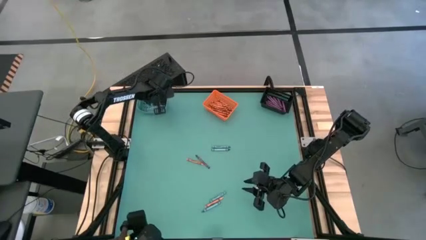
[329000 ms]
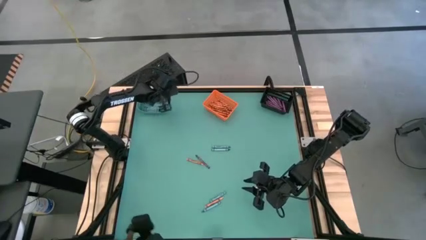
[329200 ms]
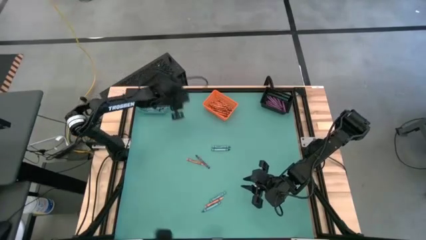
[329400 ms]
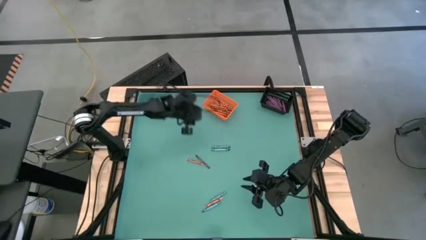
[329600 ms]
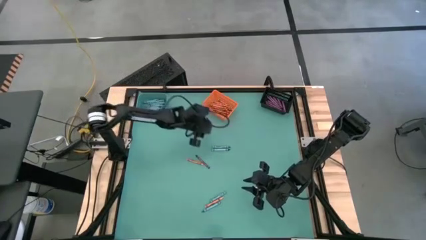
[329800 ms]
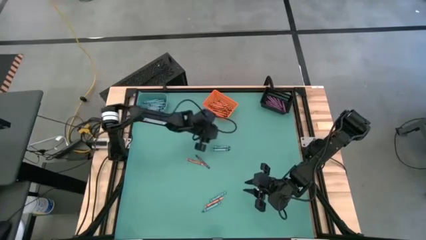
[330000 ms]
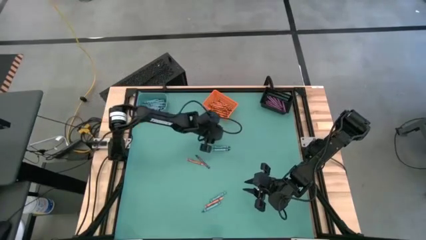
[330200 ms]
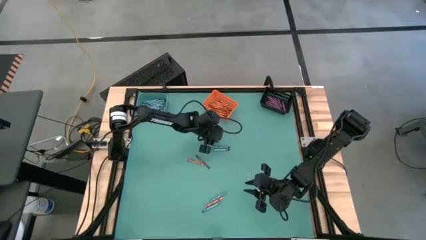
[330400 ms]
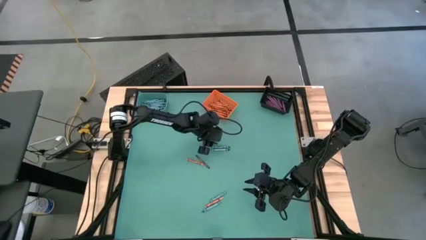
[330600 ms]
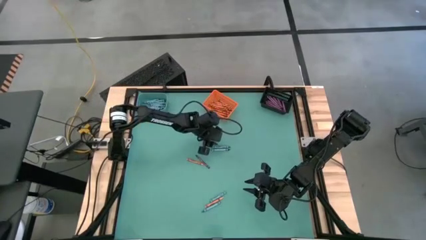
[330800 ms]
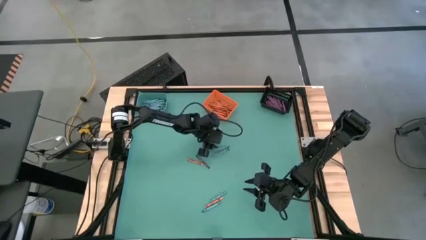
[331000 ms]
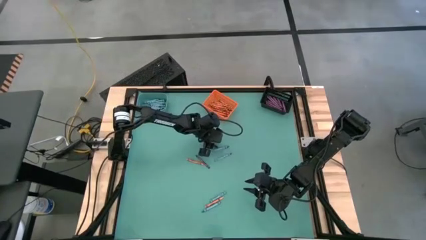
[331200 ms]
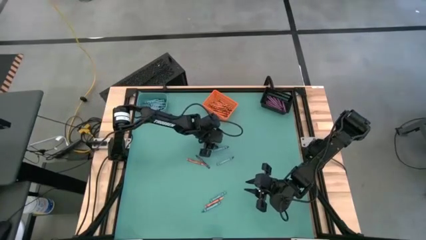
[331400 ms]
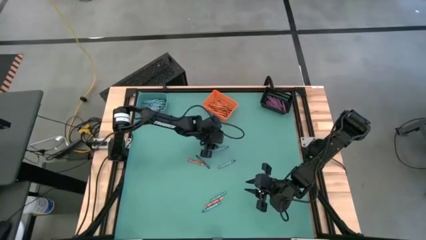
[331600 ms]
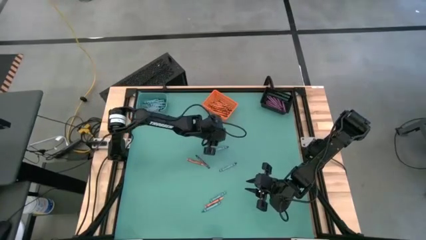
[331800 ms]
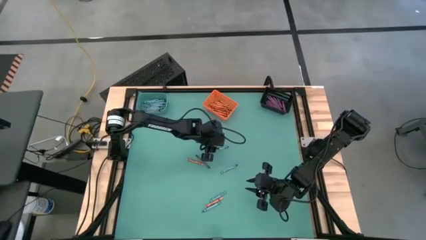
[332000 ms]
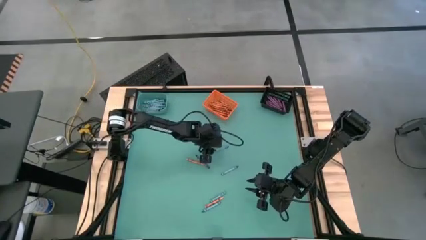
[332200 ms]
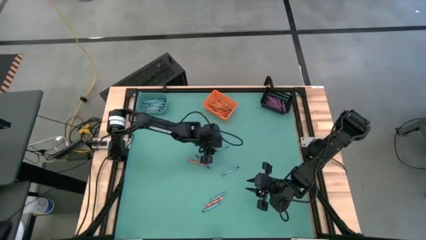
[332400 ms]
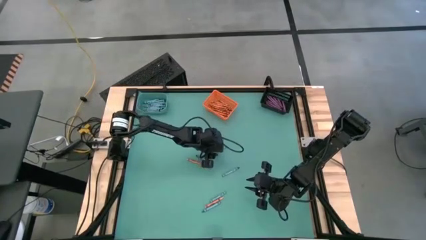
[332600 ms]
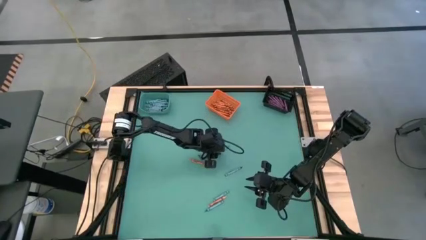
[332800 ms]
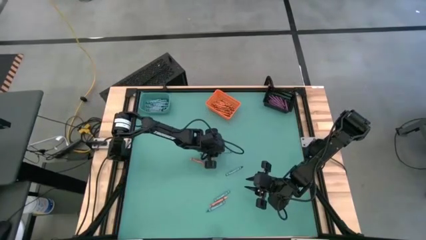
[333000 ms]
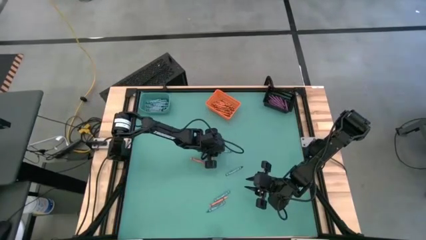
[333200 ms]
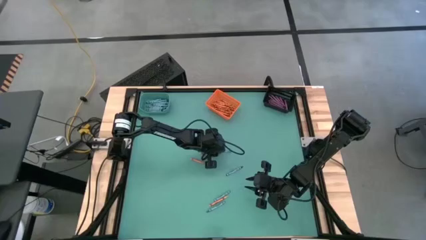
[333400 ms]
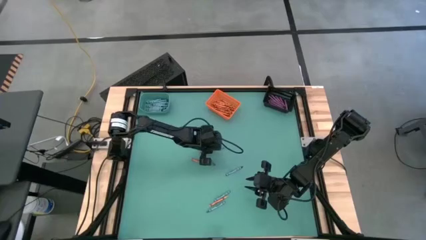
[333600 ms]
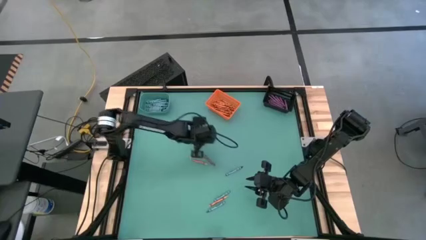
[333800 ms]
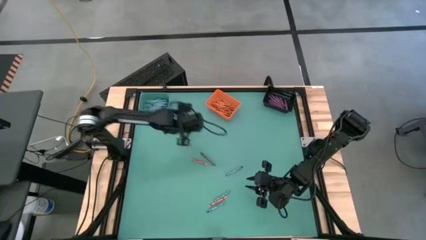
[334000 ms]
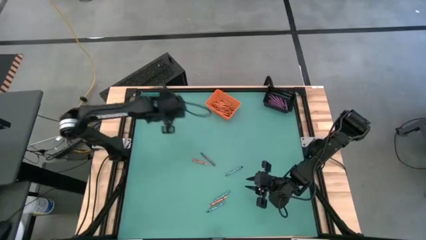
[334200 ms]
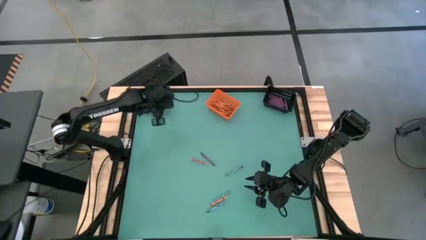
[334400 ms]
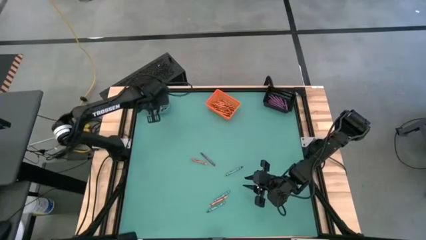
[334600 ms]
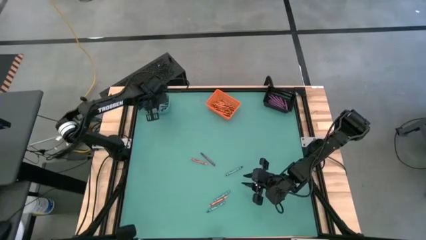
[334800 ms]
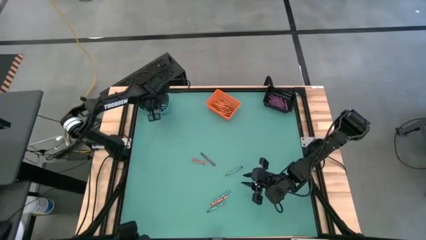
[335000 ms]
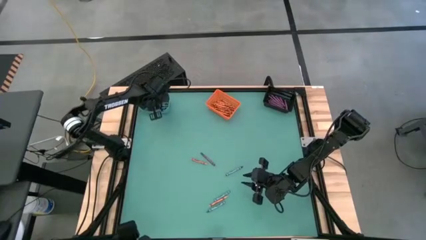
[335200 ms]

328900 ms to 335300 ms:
Task: Sort crayons
Put the blue crayon into the blue bin

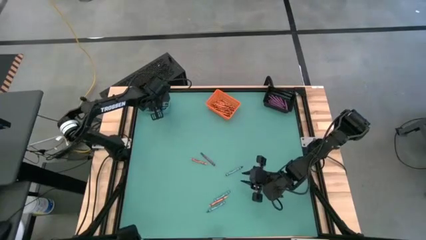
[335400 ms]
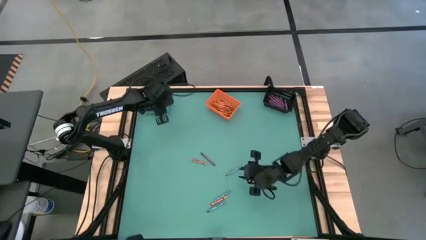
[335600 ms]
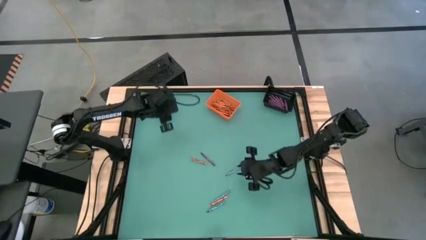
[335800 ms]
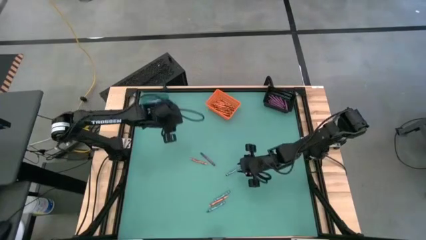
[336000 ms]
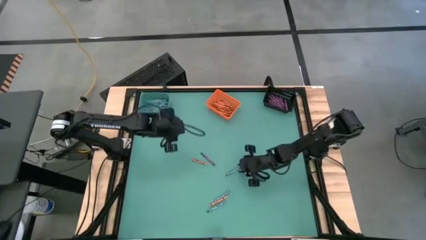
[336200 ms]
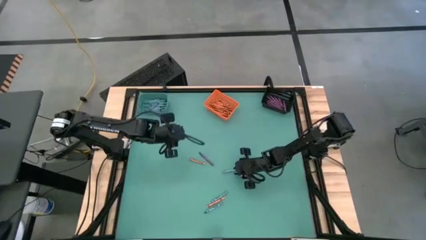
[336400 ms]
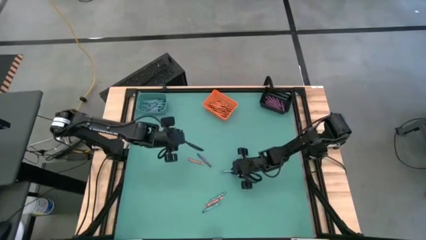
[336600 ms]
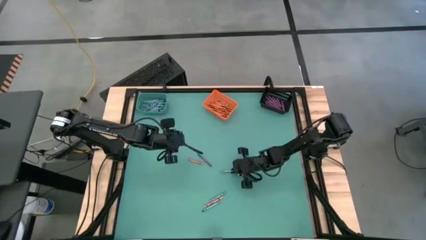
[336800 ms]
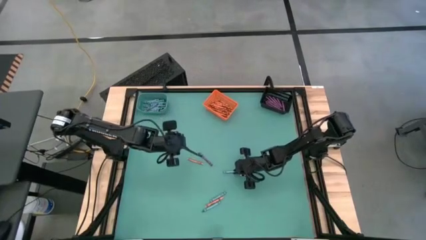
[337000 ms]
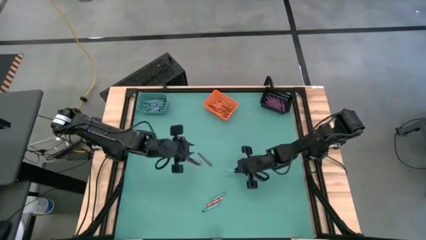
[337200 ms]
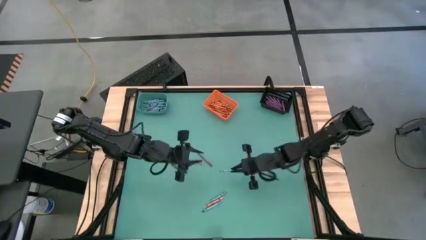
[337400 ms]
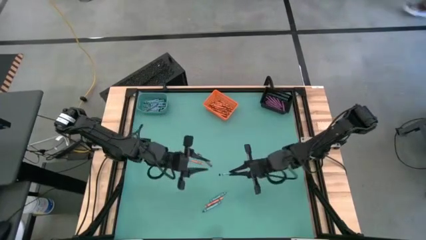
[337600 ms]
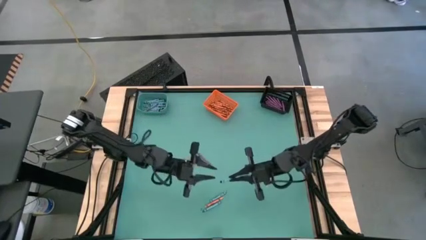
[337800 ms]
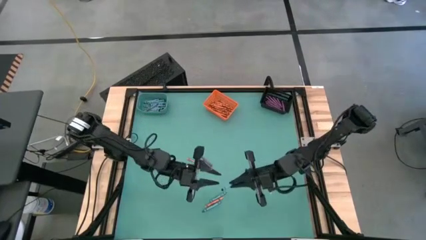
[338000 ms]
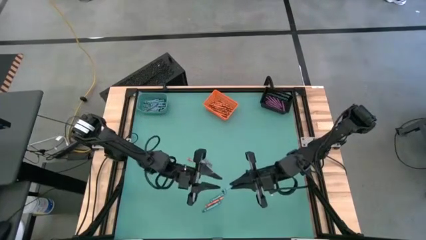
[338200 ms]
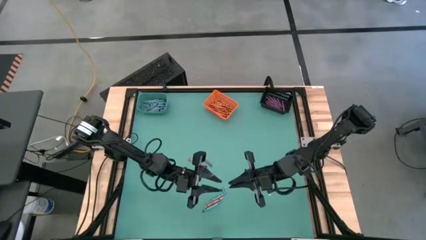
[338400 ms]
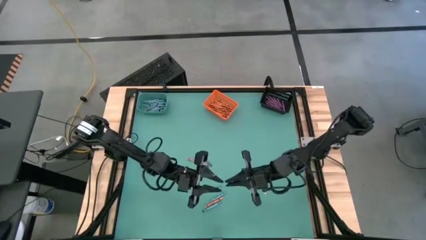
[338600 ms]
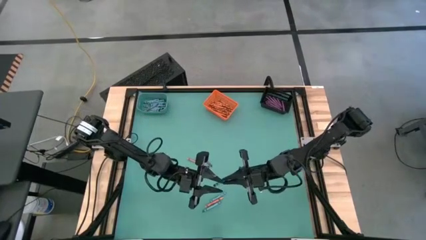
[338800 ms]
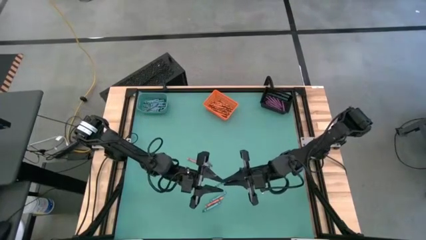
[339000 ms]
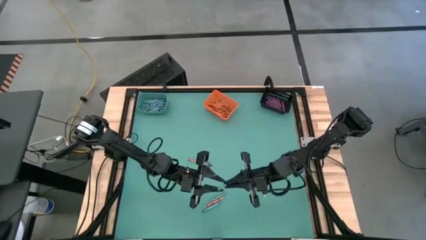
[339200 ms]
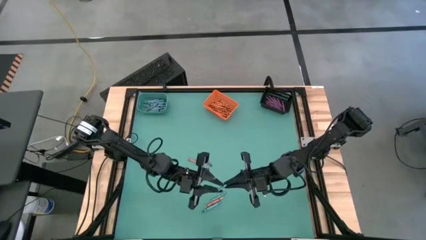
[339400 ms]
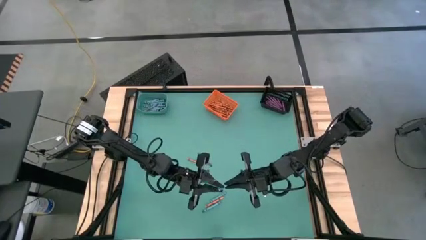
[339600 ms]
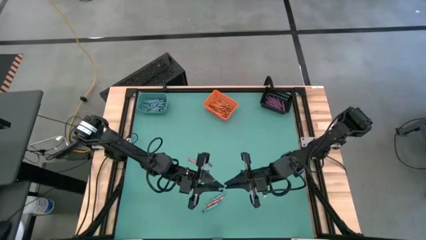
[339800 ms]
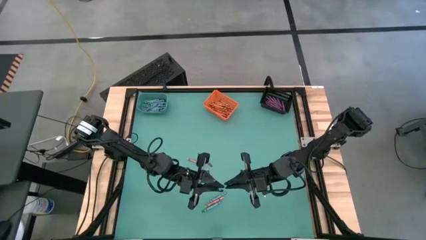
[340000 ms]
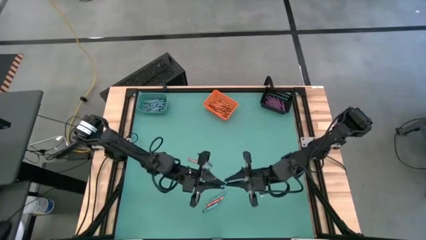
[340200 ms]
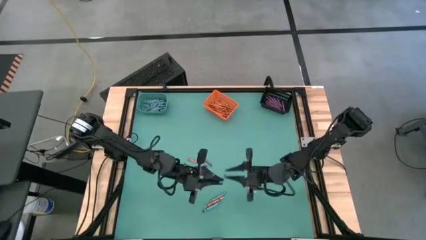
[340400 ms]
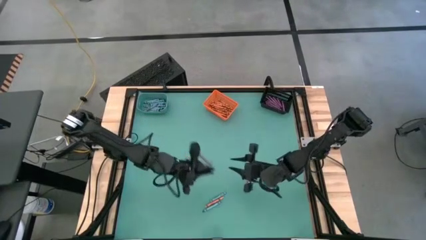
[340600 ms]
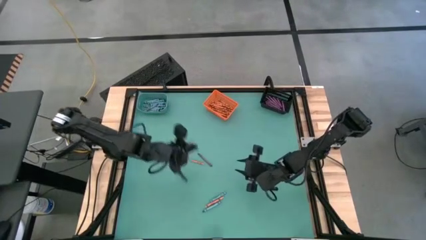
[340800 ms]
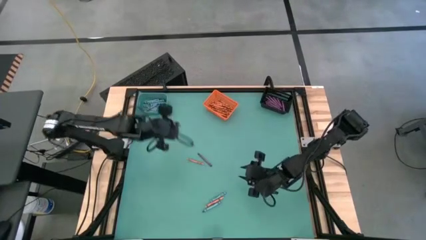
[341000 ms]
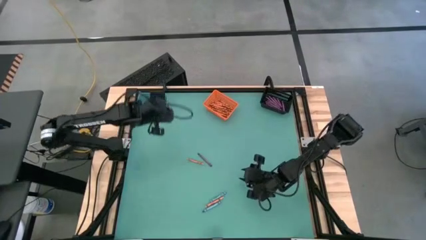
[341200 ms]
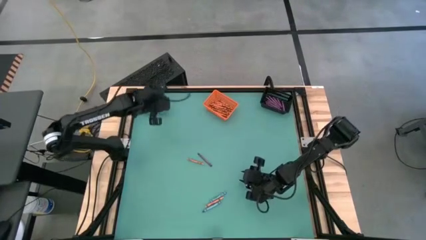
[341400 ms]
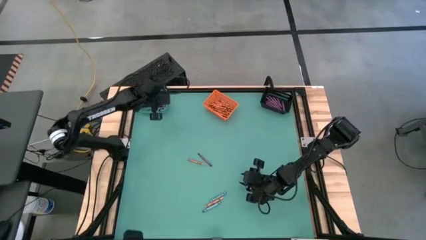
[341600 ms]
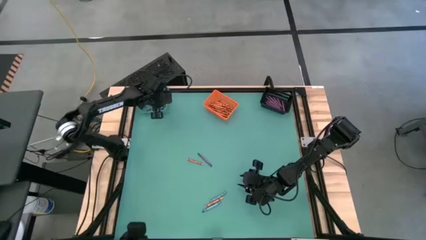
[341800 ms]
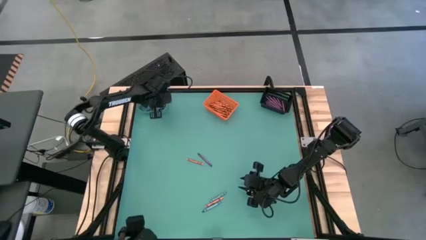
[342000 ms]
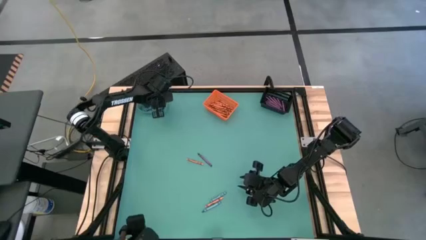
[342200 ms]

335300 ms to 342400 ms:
Put the blue crayon into the blue bin

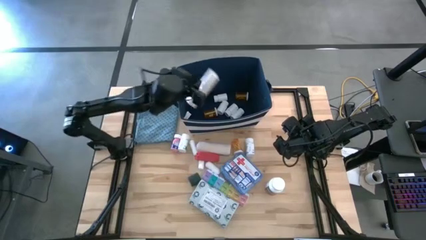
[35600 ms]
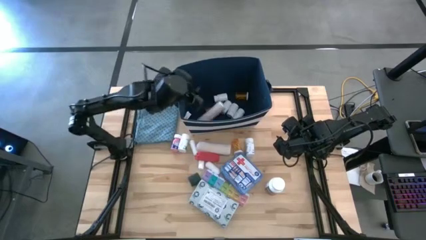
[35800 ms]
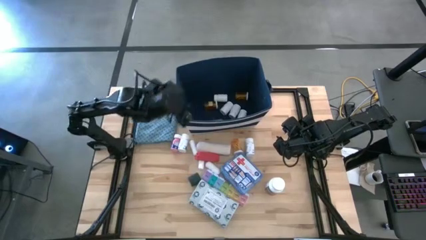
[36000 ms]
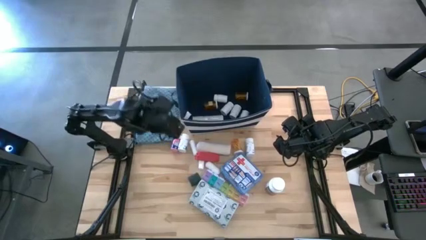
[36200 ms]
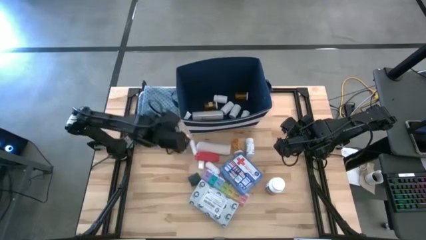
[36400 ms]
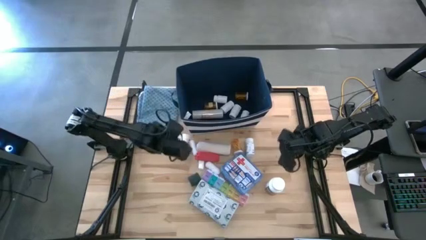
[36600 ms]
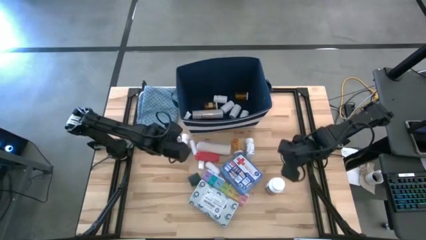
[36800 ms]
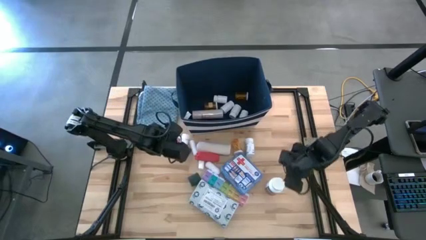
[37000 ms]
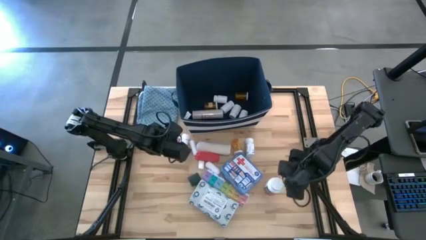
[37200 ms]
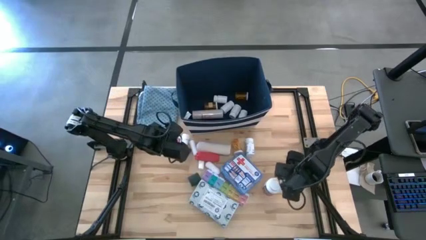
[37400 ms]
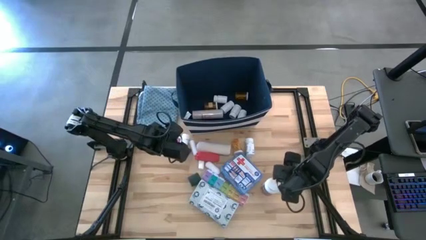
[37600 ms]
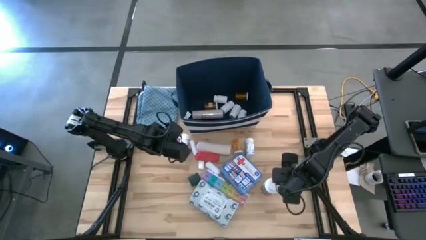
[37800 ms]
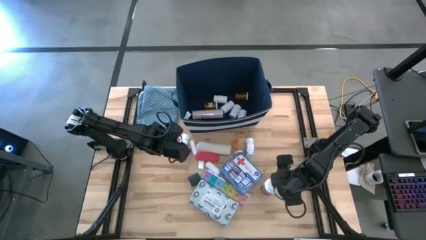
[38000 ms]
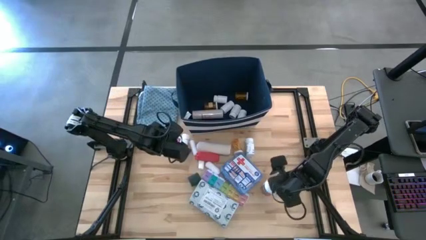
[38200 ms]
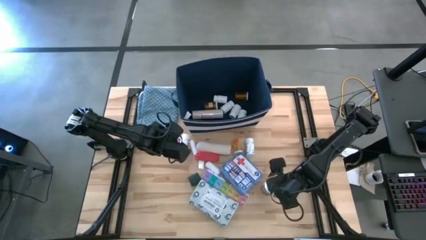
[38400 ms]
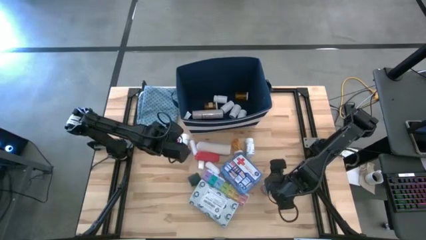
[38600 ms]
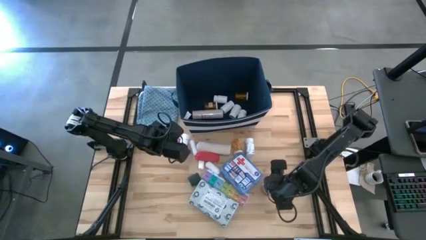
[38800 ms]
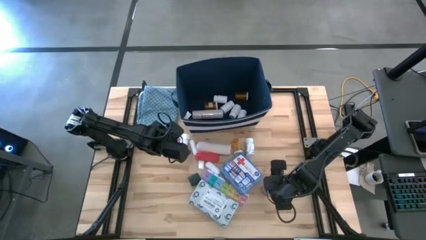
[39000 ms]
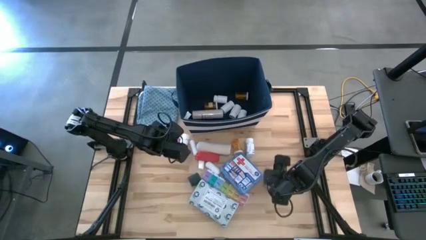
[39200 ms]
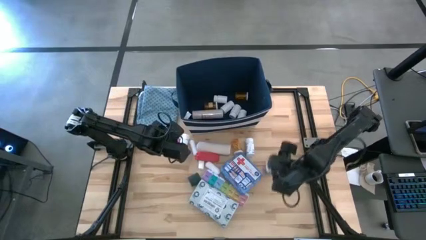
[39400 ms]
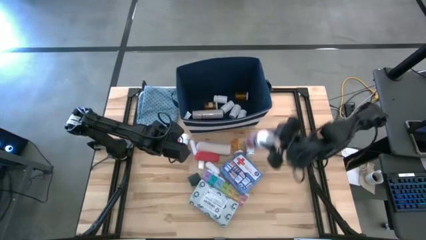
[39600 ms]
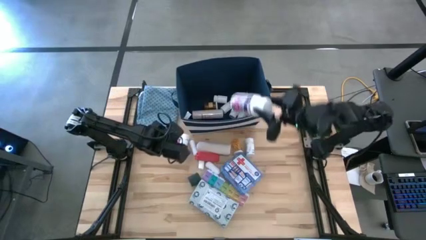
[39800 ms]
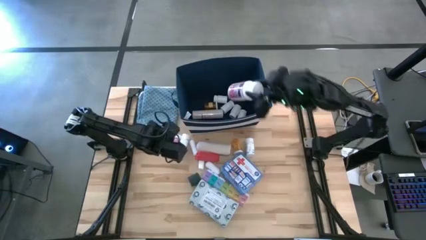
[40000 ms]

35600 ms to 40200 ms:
Task: Pick & place medical supplies in basket/bin
Put the large white pill bottle into the blue bin
